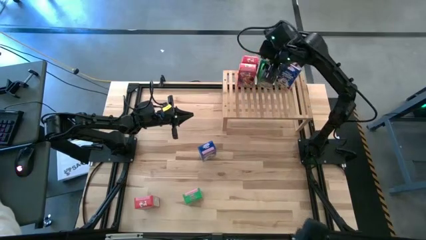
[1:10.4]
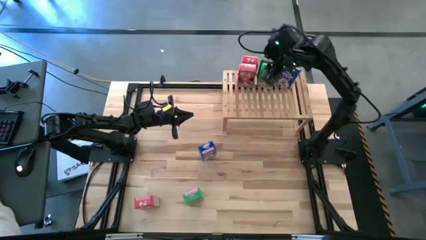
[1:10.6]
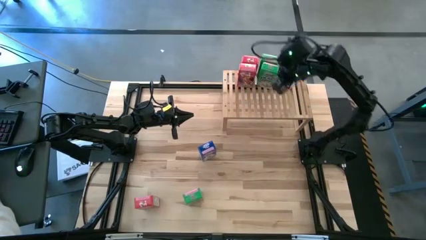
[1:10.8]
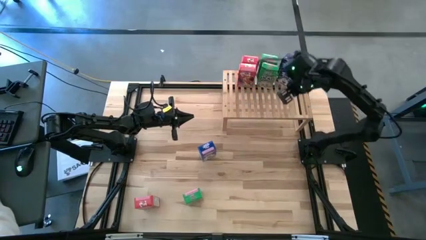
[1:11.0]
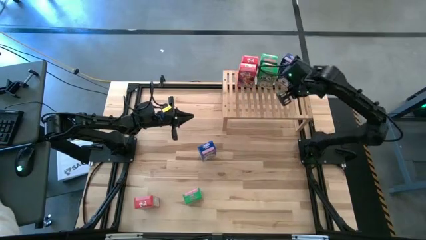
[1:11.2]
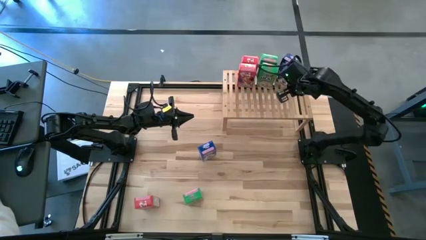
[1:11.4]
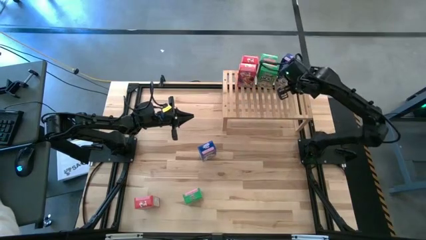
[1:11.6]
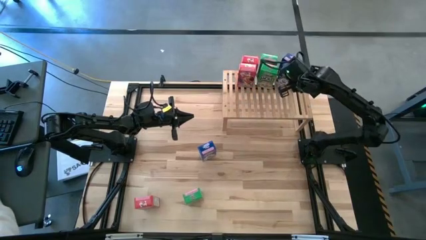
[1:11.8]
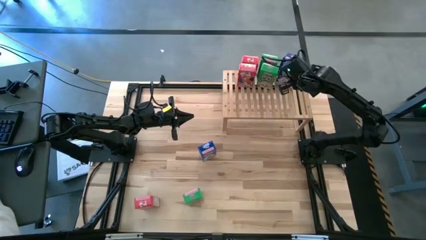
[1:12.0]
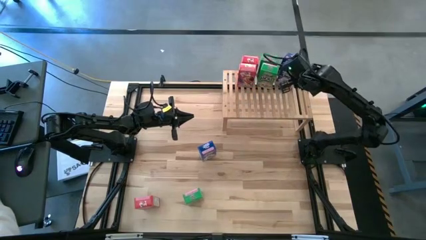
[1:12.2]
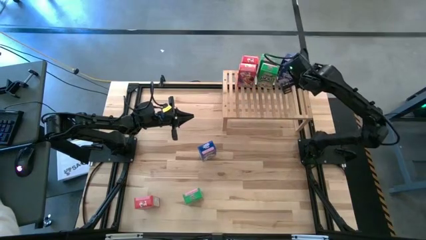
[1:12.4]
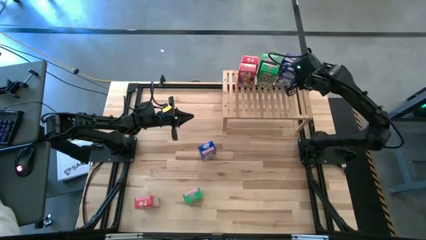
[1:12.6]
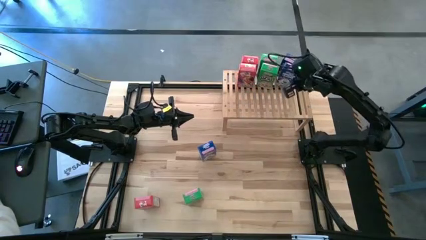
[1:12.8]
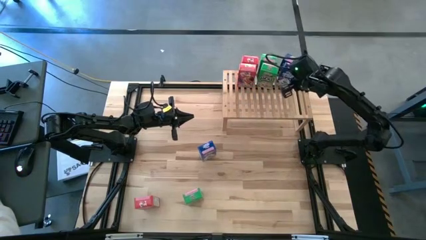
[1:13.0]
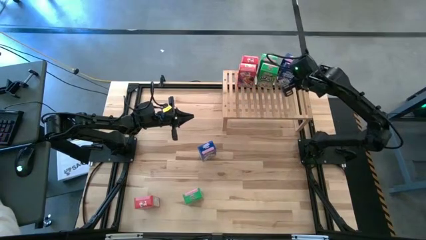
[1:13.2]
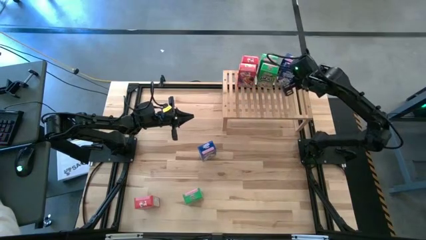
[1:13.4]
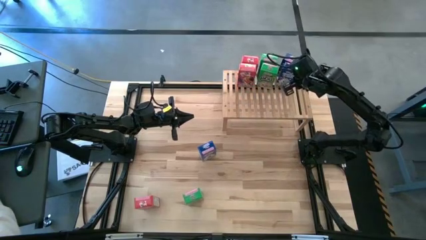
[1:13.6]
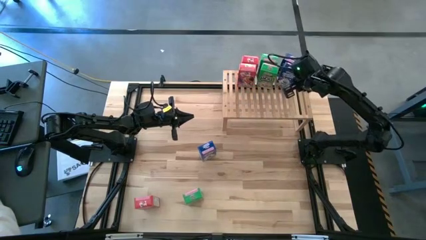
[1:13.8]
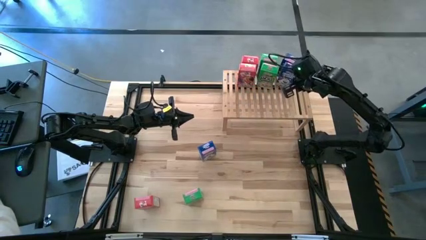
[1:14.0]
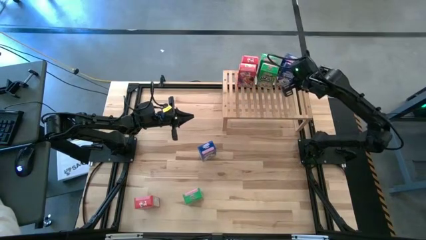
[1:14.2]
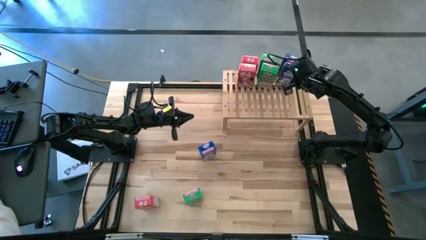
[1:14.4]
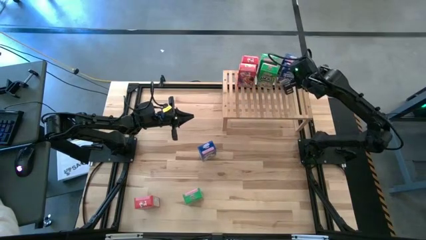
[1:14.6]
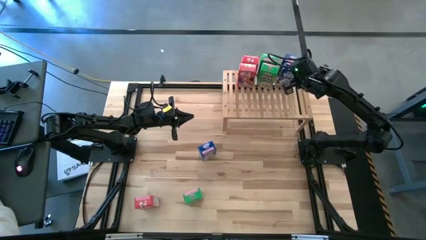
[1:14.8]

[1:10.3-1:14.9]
Task: Stack cereal on shelf
Adjust the blue cereal box on the shelf

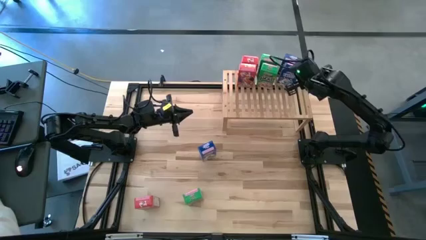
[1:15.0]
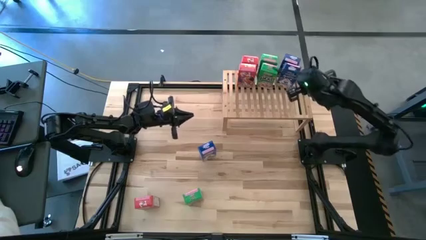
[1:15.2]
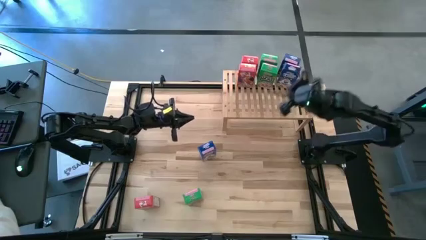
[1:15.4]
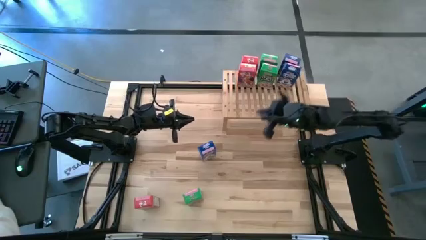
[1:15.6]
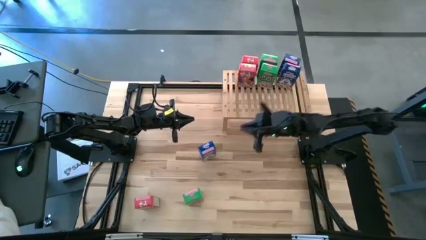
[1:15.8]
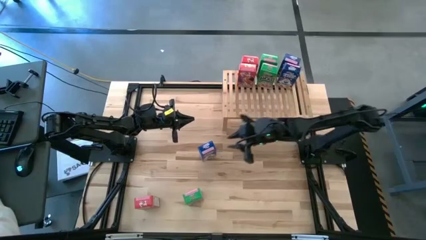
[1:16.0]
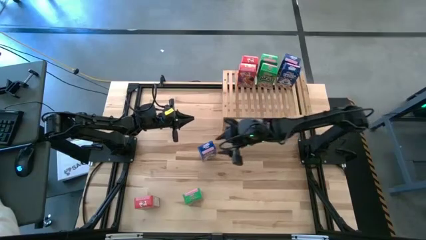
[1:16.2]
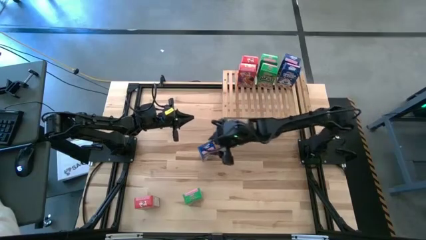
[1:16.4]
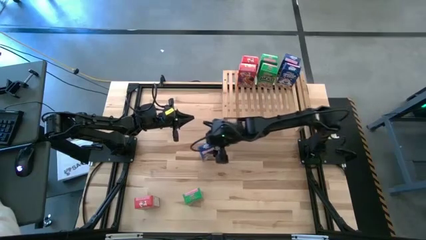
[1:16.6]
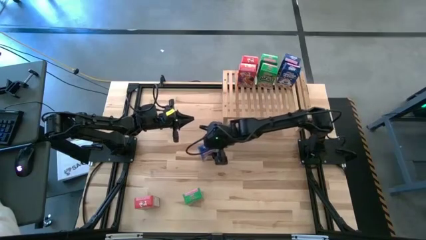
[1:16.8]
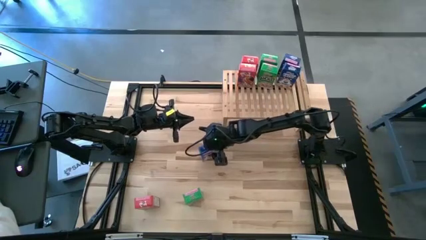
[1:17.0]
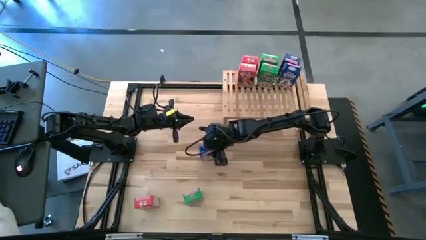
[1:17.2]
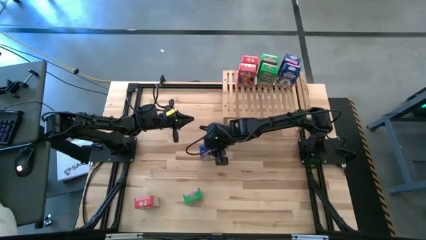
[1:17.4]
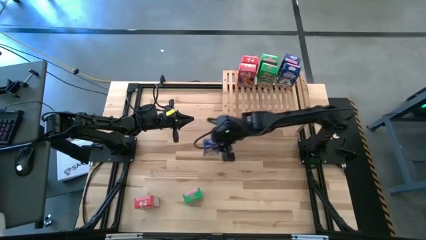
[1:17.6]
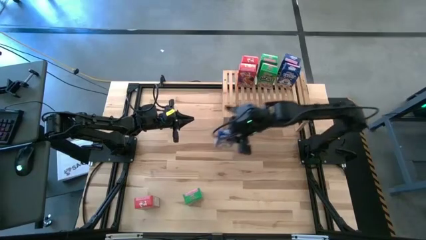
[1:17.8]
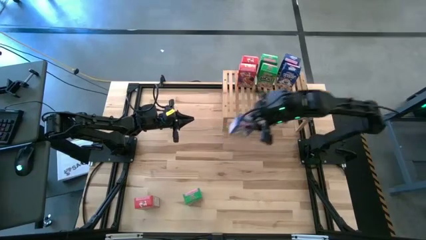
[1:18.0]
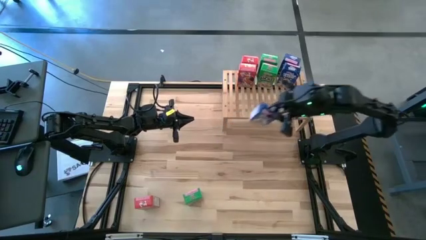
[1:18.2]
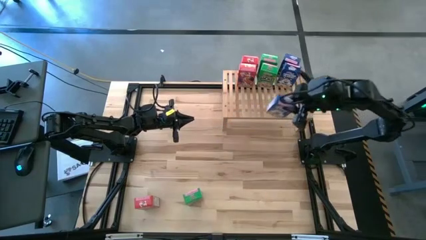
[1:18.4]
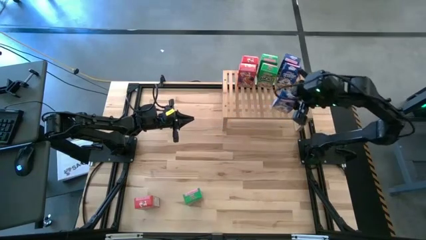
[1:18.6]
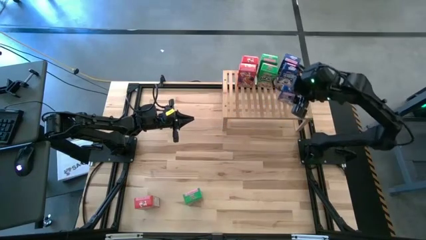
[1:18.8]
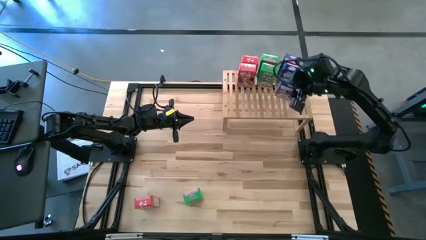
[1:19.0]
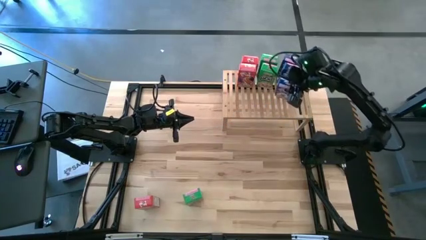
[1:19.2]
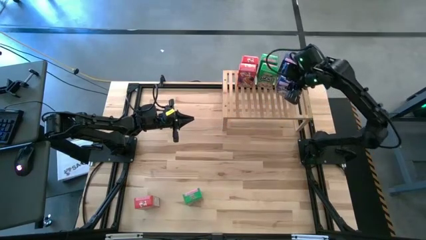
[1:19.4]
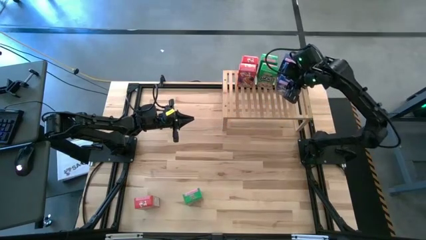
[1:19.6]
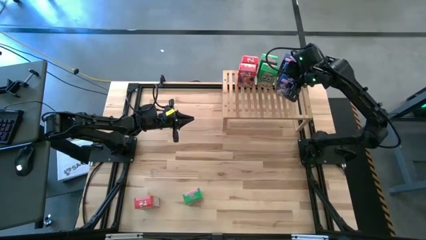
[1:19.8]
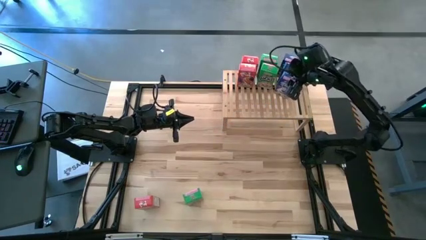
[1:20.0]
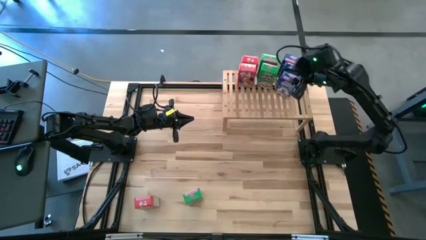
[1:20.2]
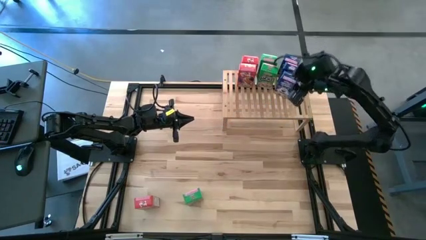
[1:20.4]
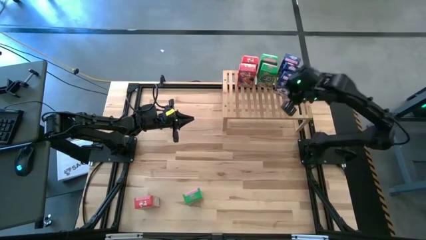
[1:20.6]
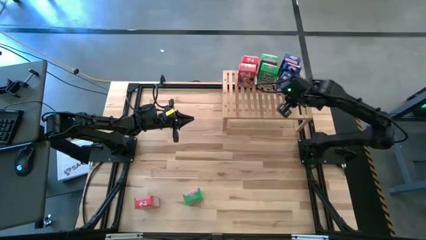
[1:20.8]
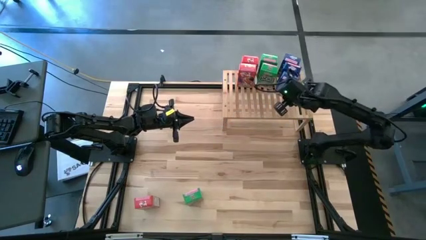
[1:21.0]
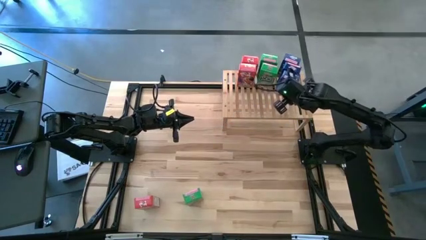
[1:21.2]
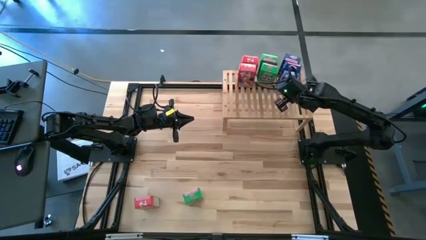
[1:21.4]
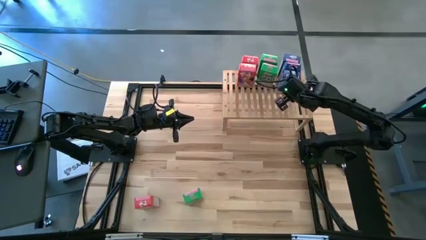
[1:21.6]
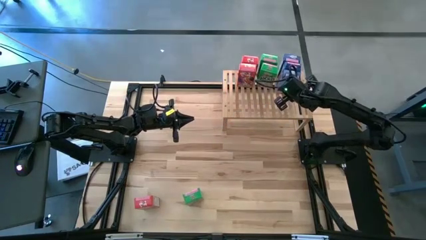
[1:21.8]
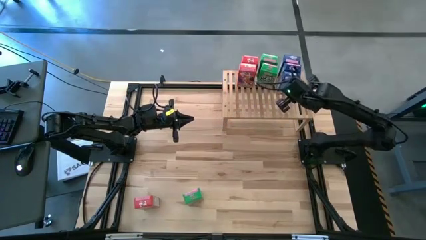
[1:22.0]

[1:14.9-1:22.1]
Put the blue cereal box on the shelf aligned with other blue cereal box

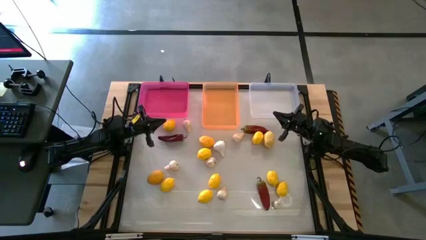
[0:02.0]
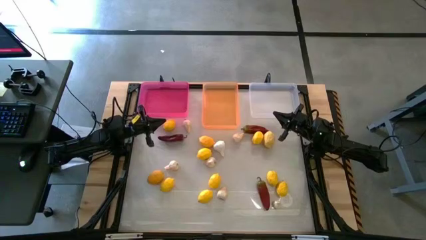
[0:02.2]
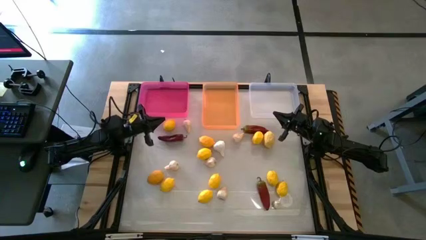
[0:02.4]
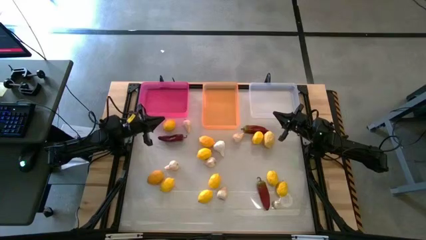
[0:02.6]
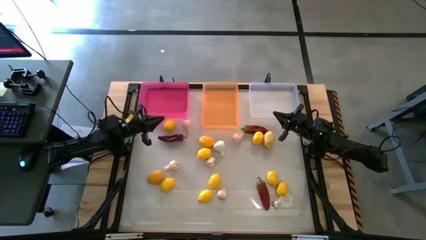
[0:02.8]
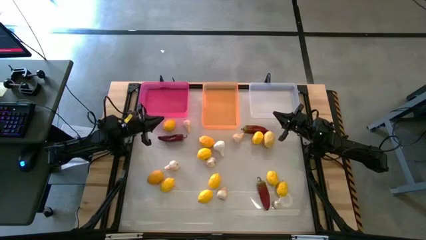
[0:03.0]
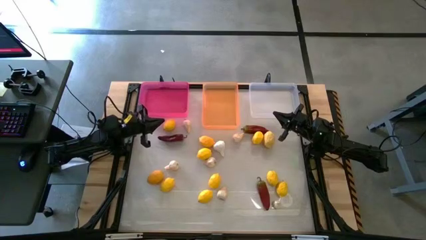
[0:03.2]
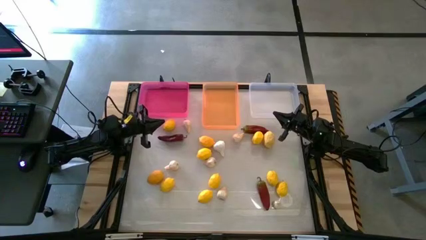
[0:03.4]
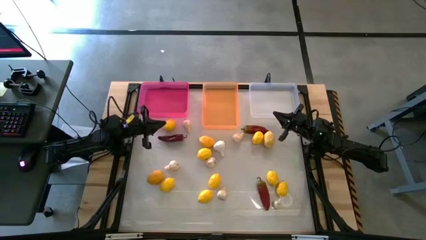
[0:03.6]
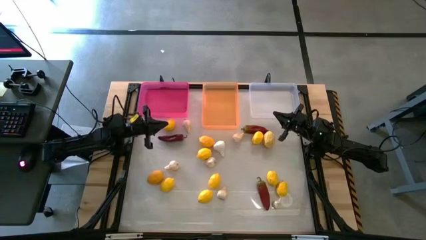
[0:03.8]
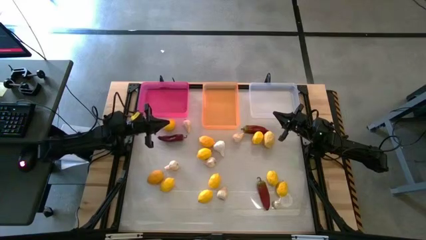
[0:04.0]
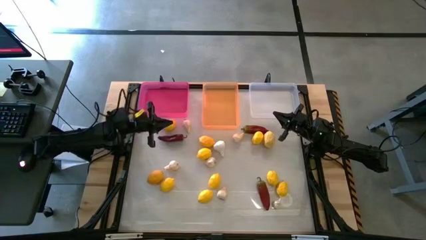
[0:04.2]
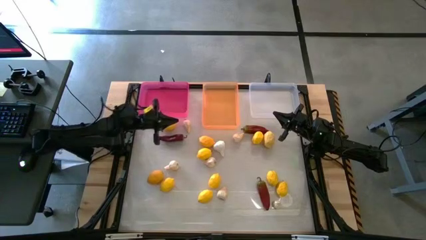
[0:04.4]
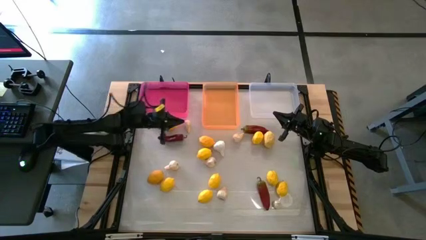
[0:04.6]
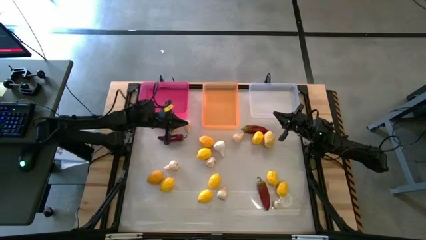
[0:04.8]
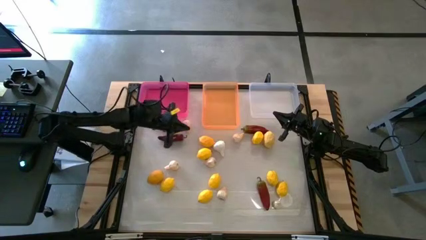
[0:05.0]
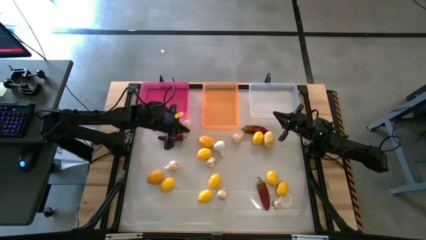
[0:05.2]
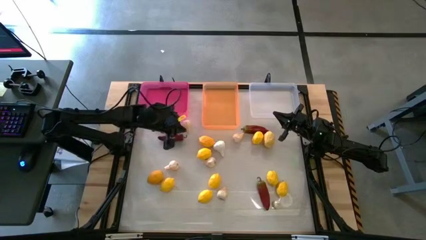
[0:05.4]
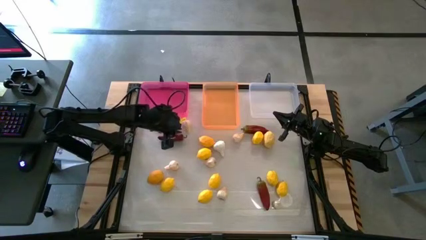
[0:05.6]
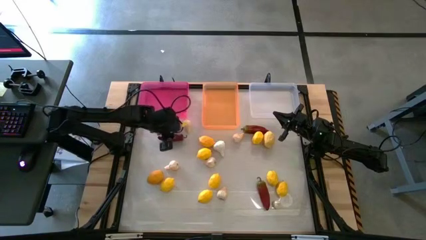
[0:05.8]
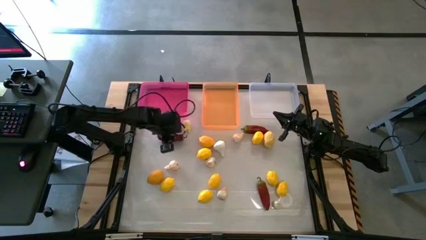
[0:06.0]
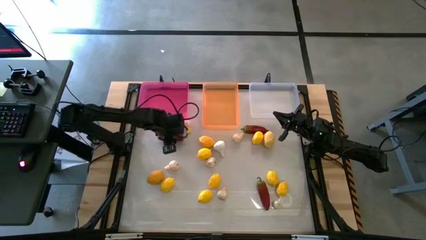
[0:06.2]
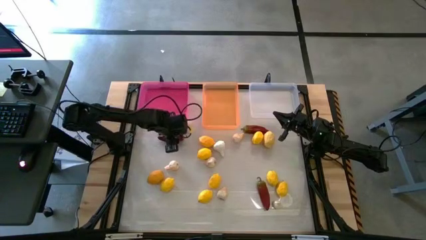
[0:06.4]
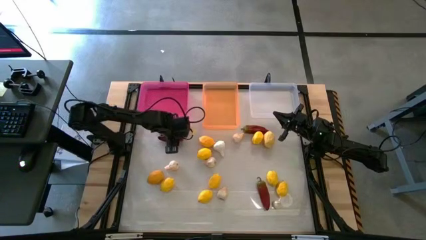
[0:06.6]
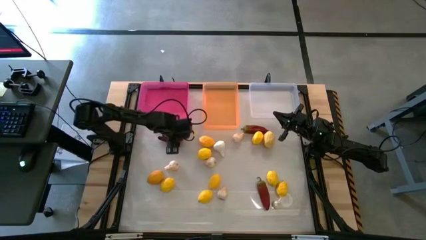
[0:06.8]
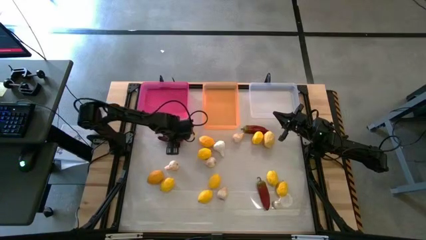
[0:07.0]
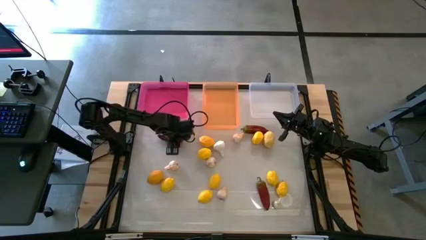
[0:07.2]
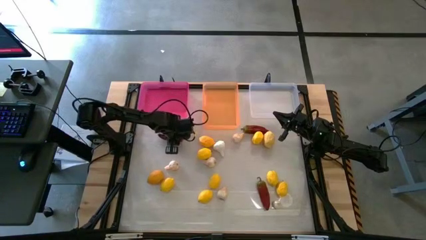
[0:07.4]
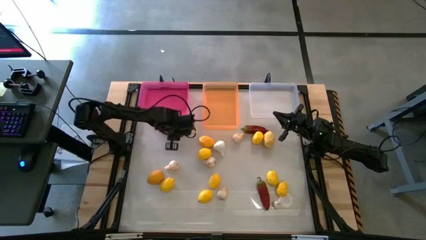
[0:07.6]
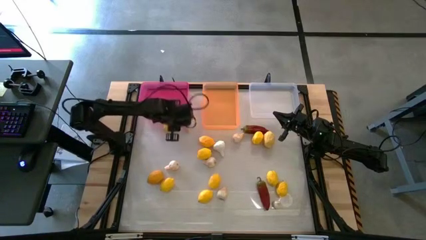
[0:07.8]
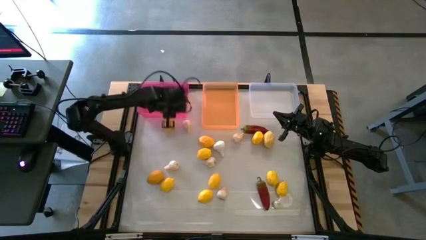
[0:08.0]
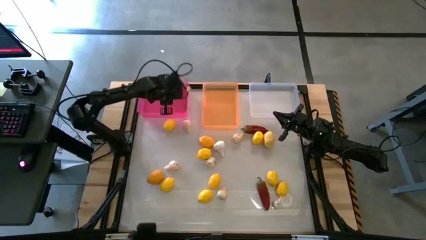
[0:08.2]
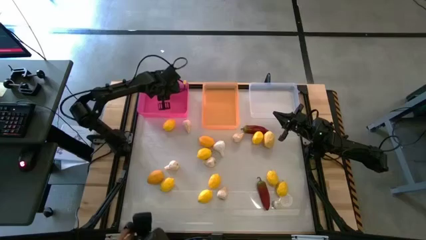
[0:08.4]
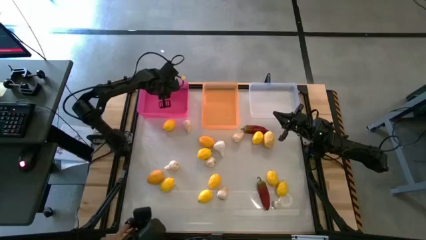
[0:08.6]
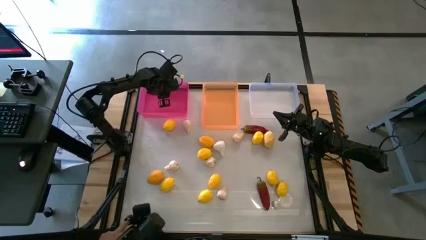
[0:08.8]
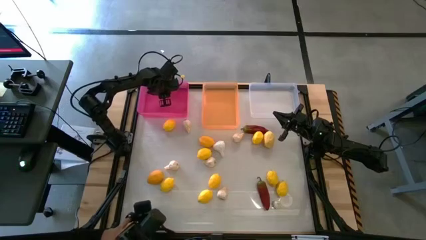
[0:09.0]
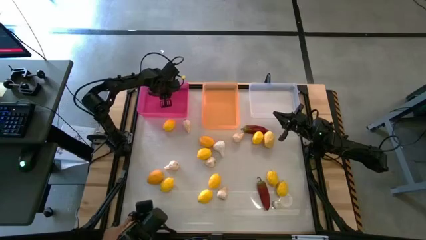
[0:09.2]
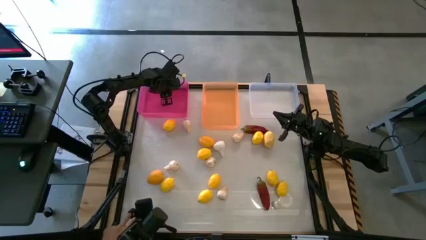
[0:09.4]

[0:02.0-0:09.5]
Task: Sort produce into baskets
Put the red chili pepper into the pink bin
